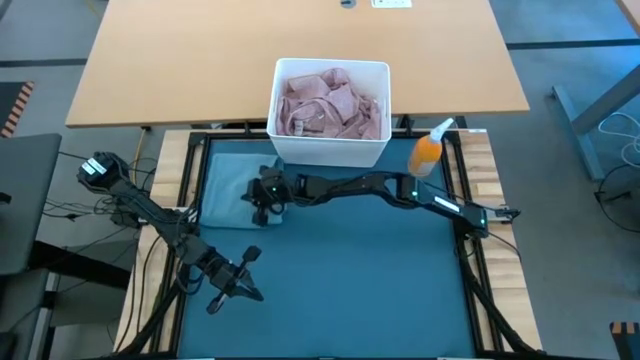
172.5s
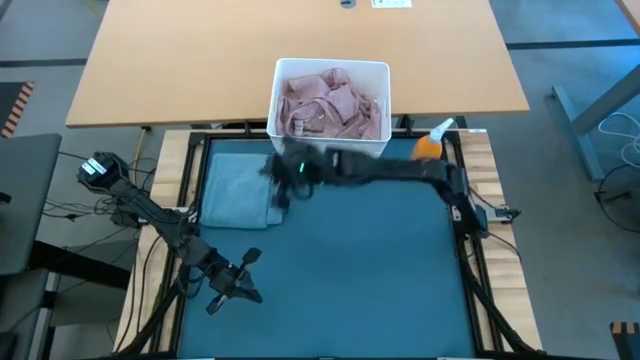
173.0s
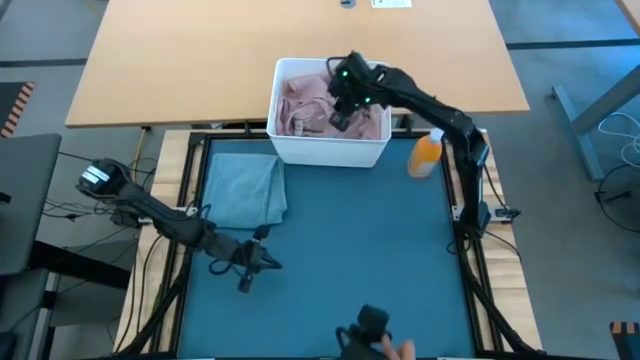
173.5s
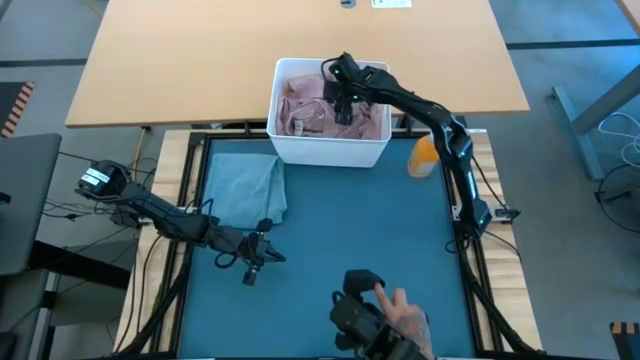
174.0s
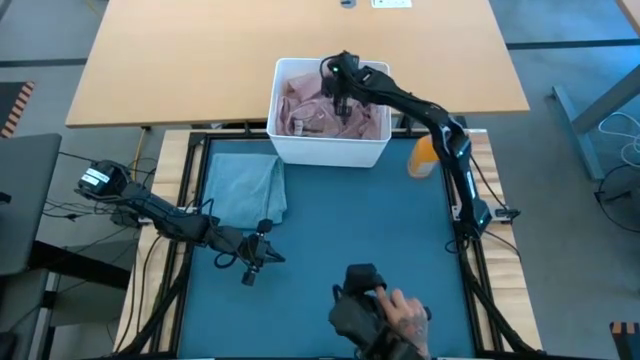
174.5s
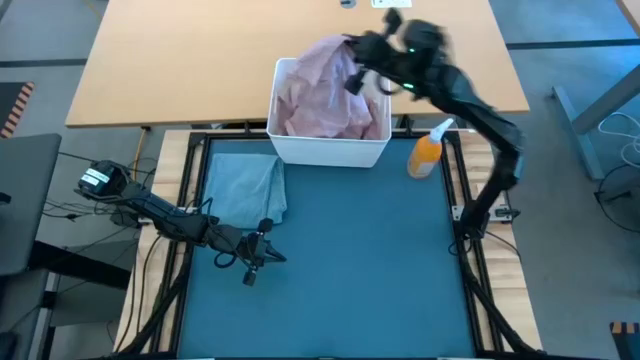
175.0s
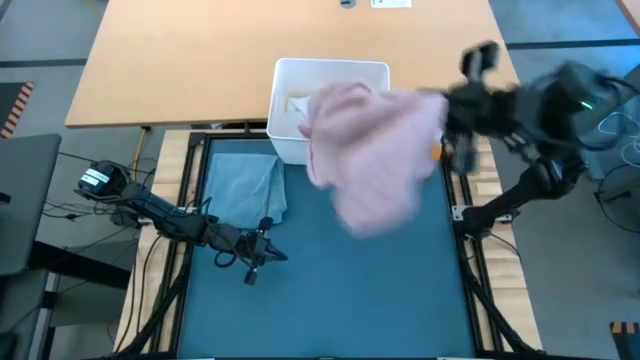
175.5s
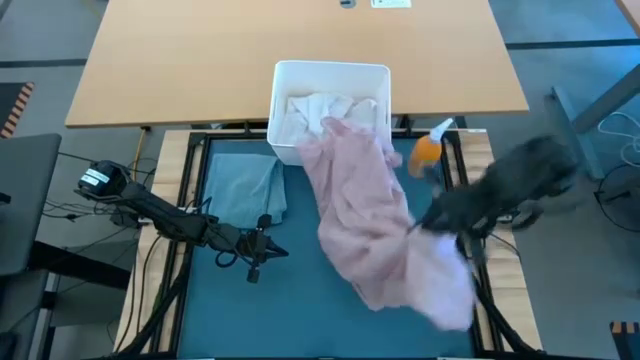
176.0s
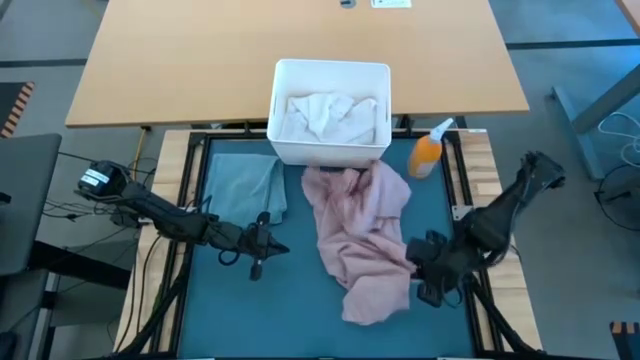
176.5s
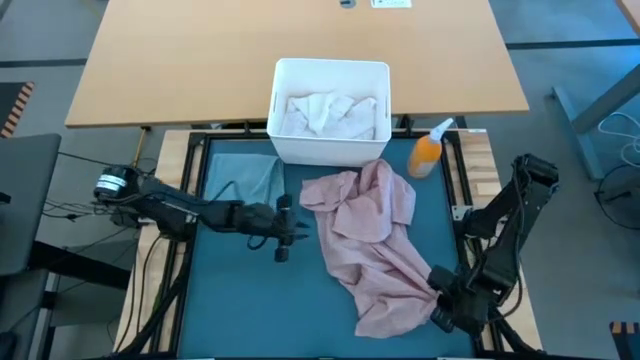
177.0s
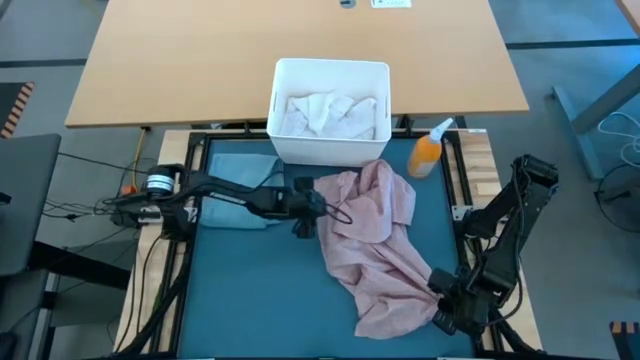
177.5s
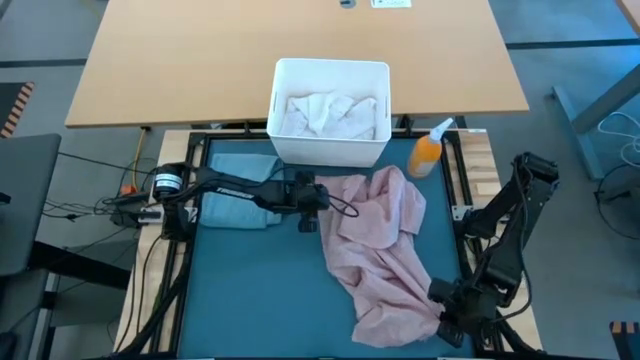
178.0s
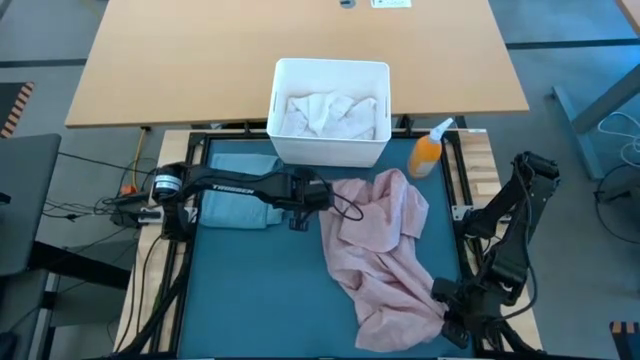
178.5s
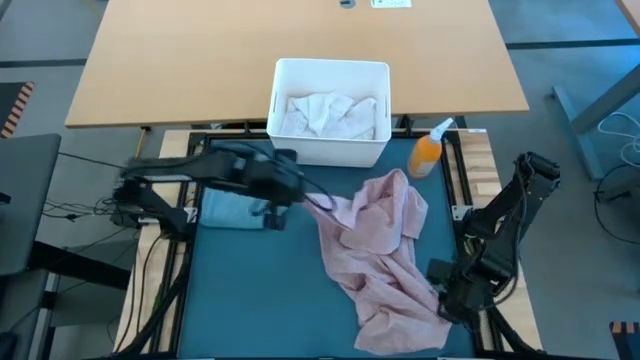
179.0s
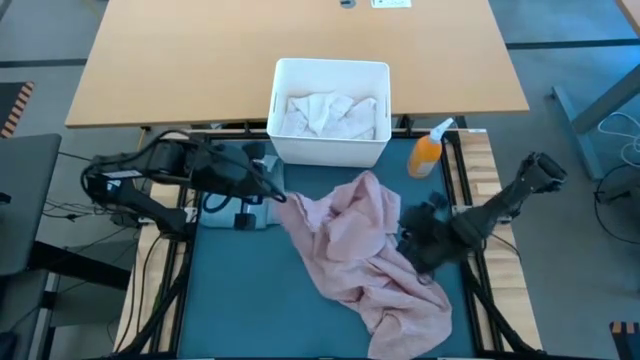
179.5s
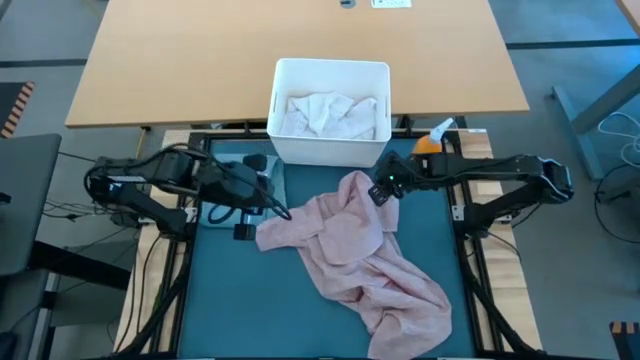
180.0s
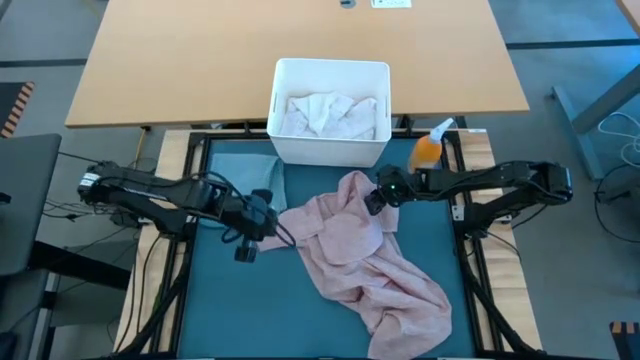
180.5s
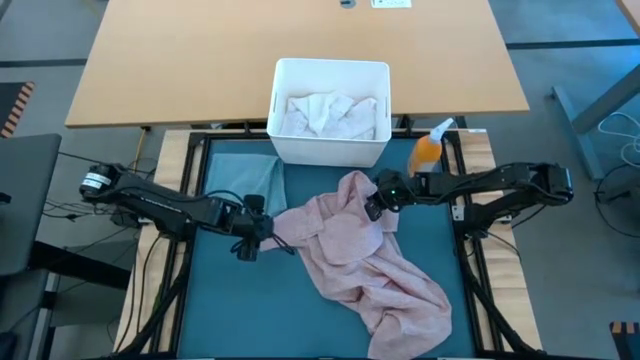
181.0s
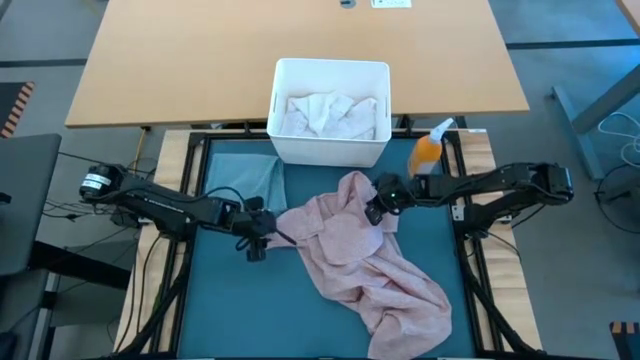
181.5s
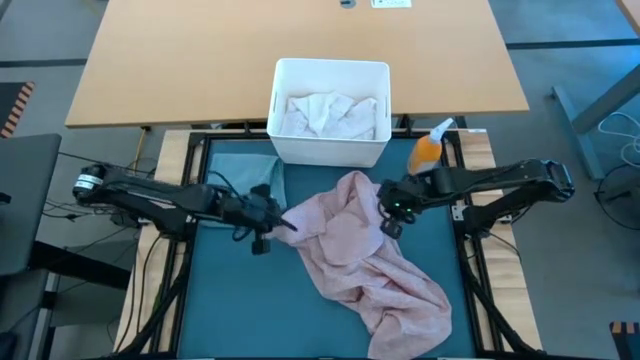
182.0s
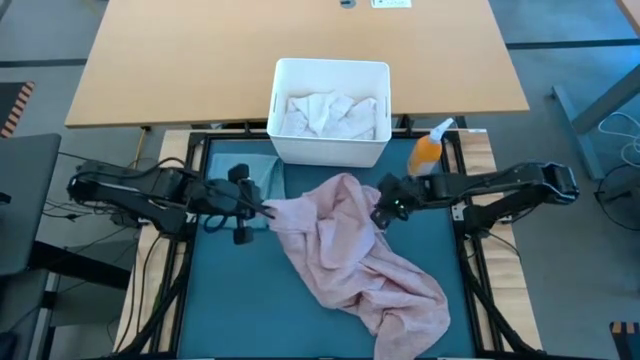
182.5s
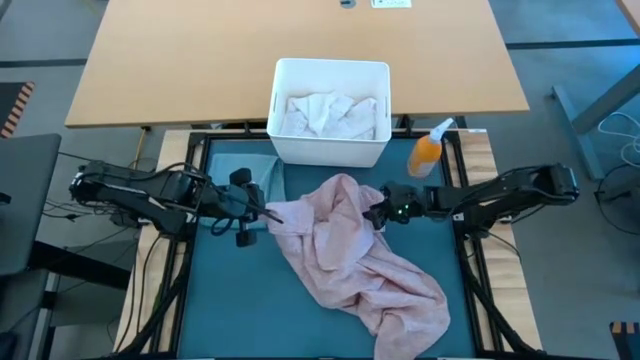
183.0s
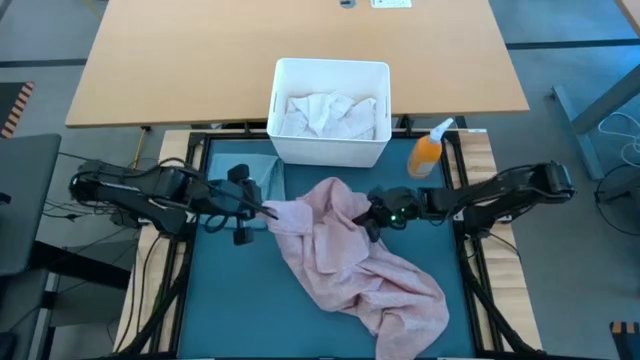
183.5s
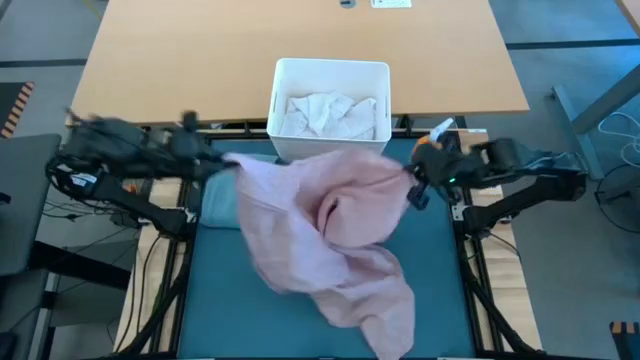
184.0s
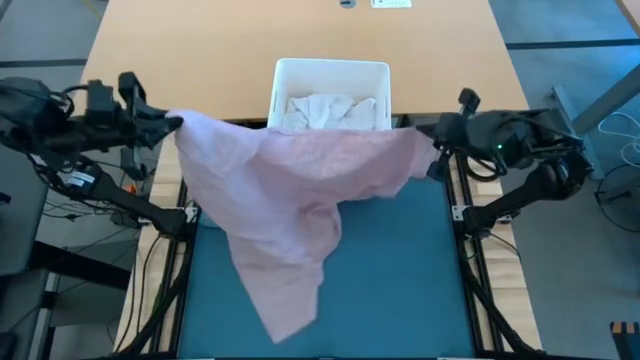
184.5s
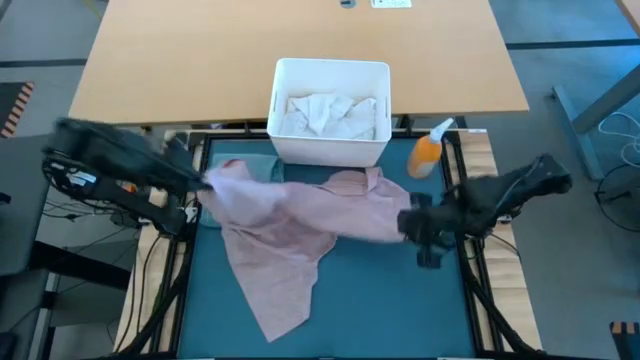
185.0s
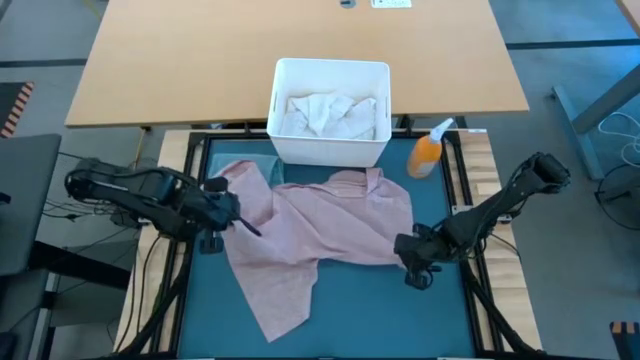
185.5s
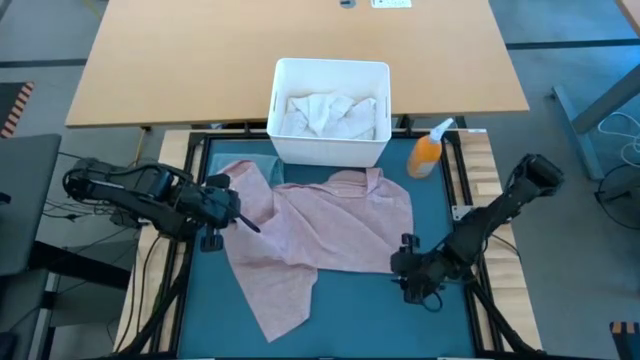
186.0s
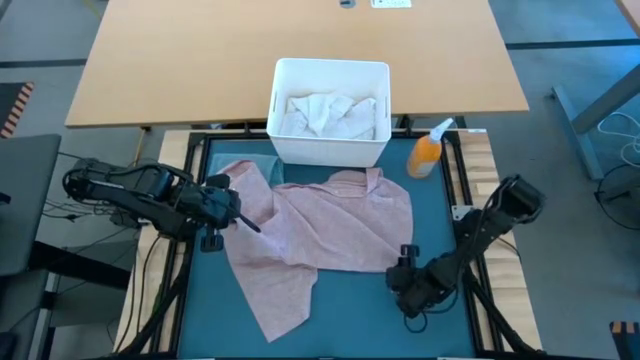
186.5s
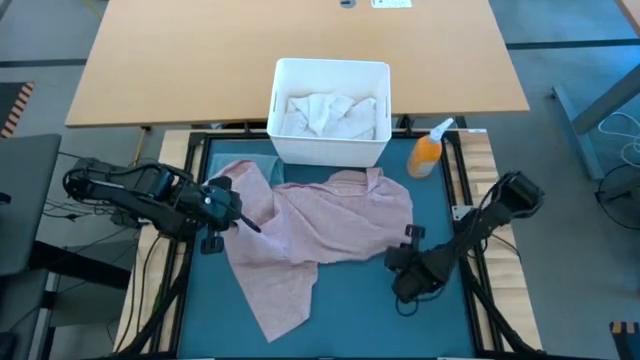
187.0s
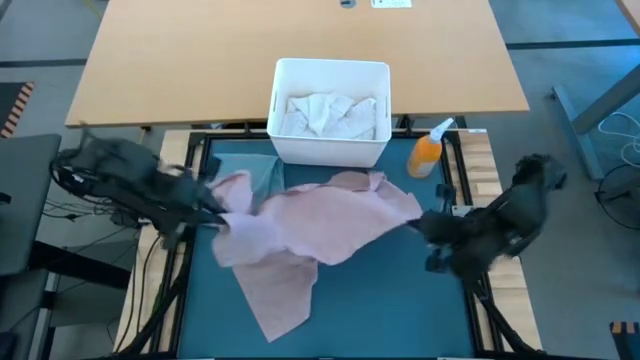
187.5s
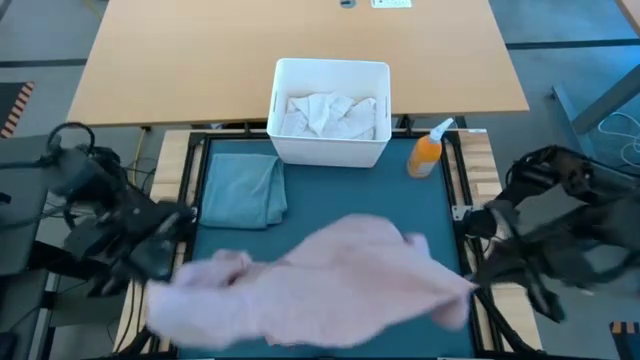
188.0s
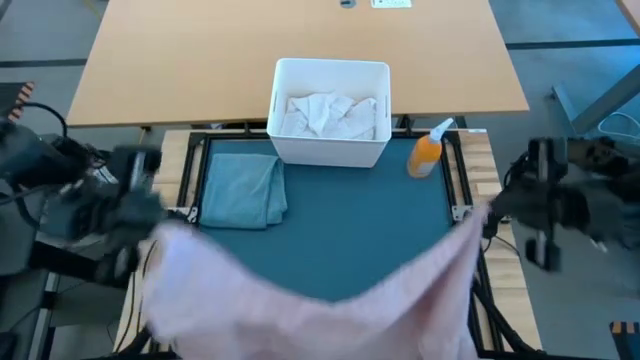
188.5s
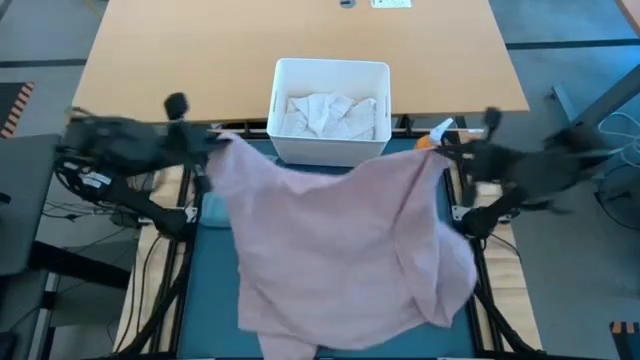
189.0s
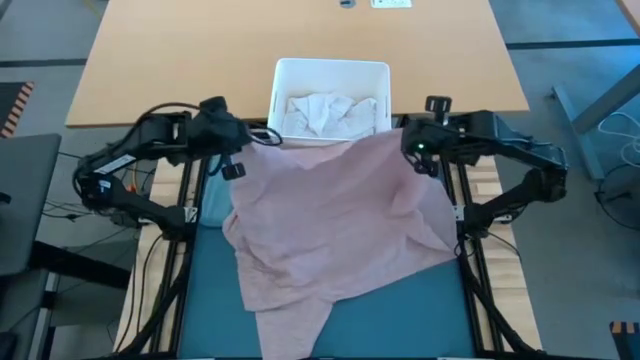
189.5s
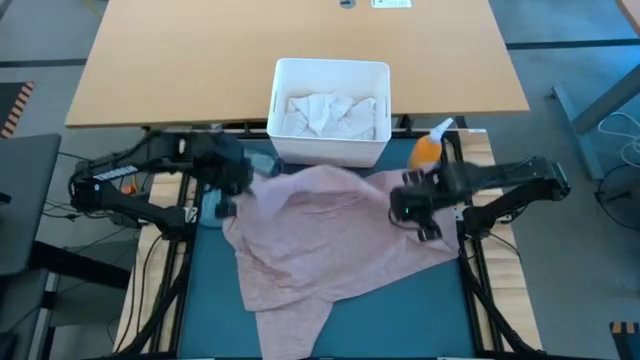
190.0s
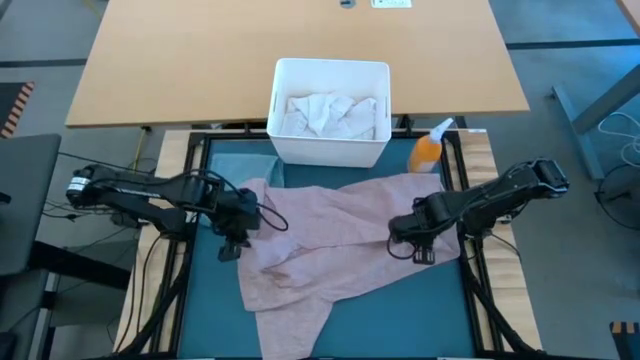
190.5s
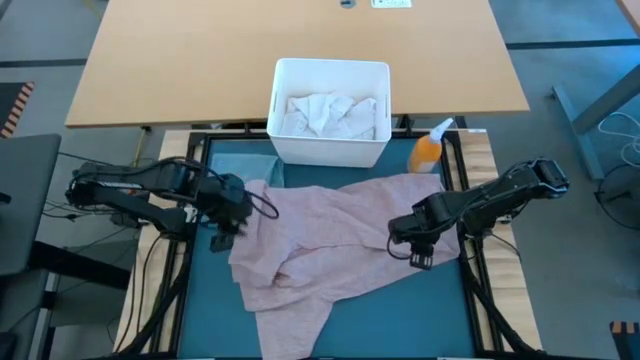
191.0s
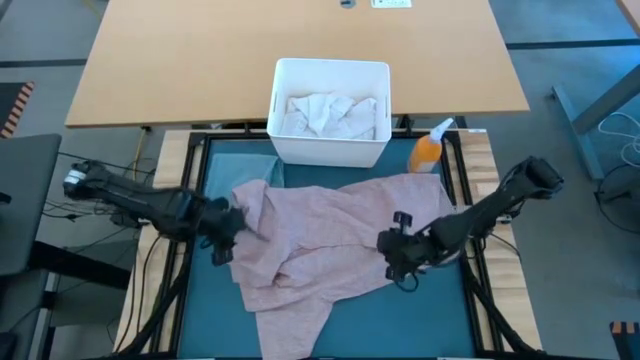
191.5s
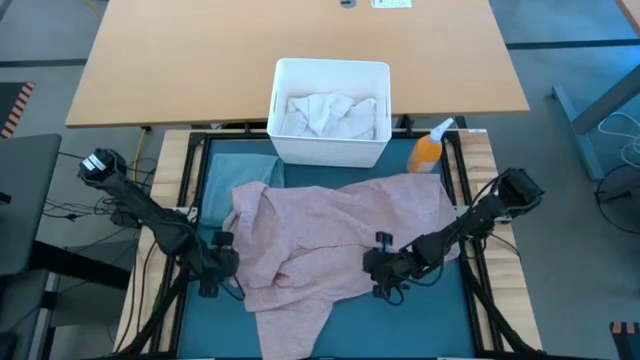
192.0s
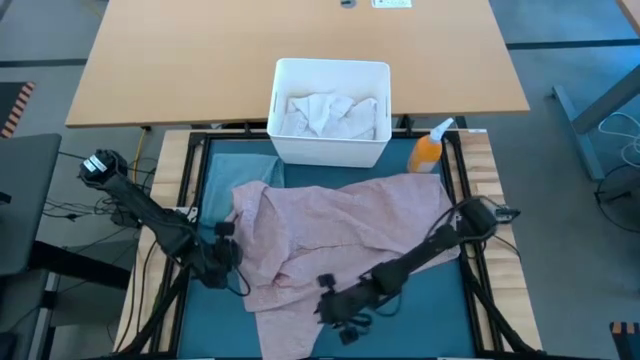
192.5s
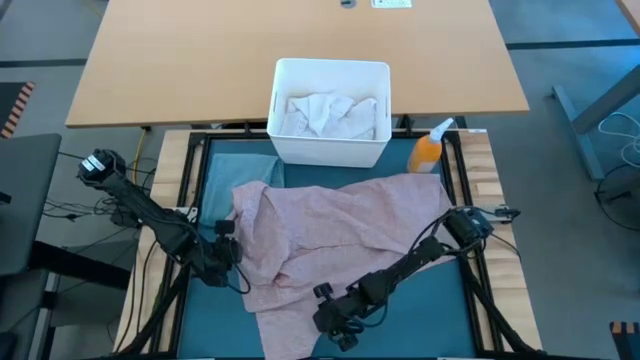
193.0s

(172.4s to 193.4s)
Task: Fold Laundry from Bin
Fold the pink shirt
